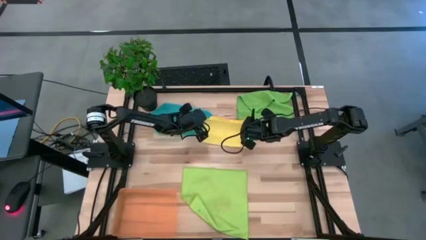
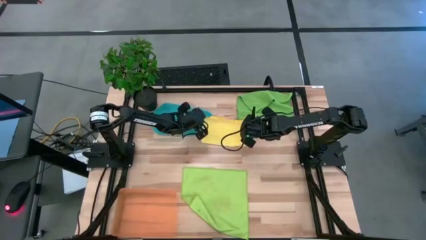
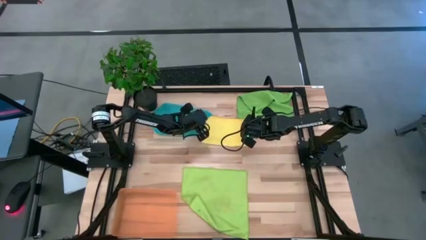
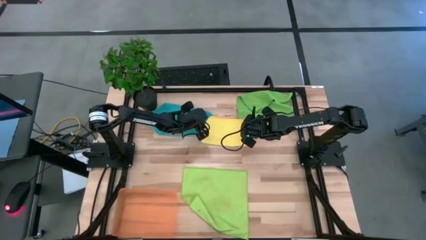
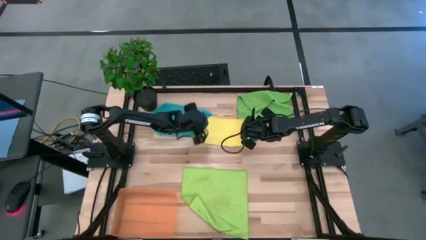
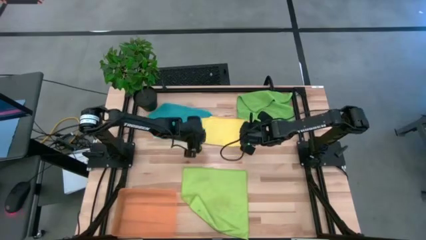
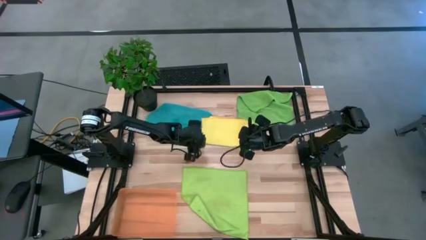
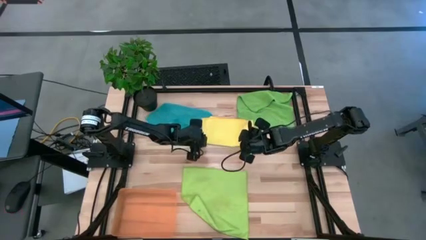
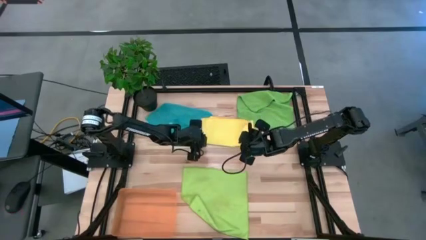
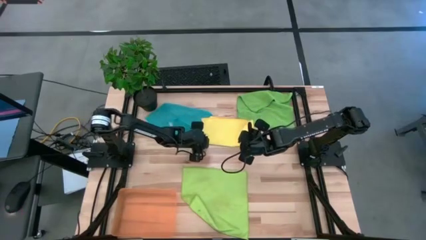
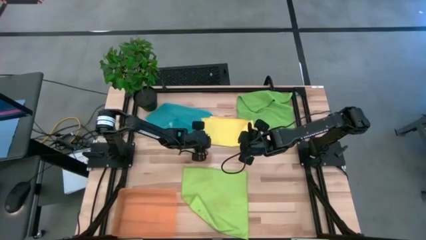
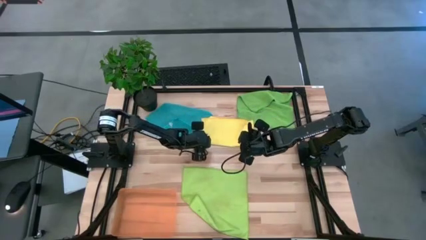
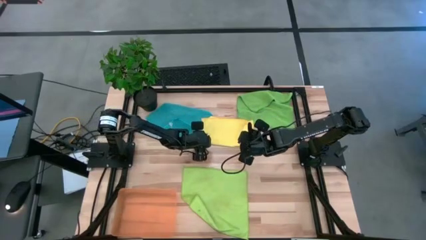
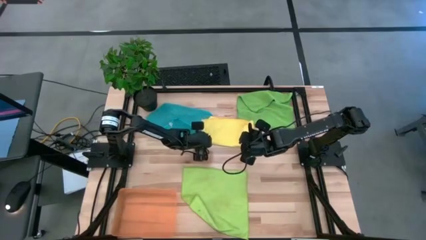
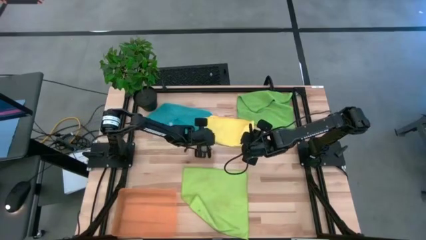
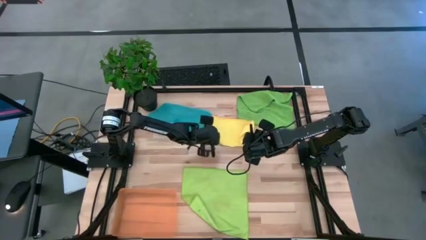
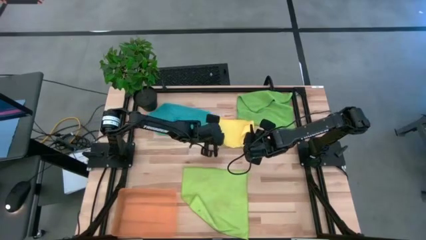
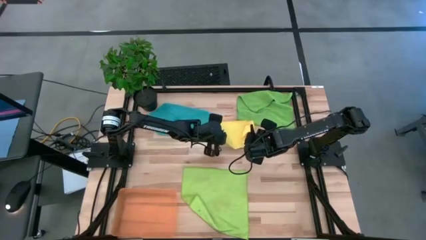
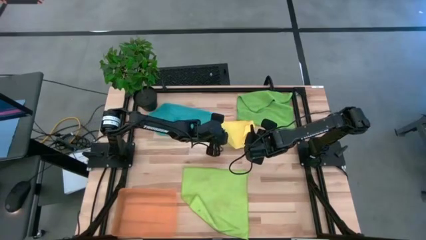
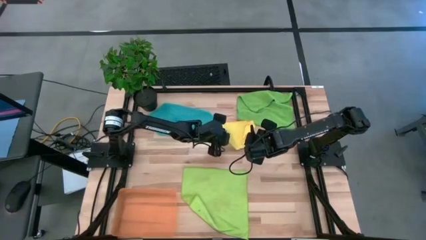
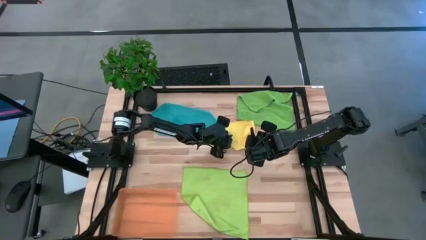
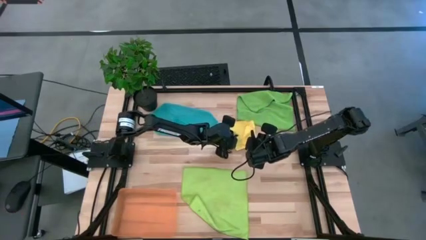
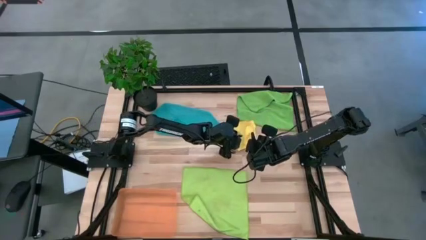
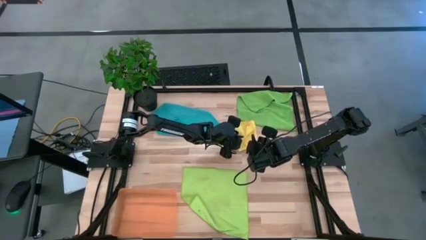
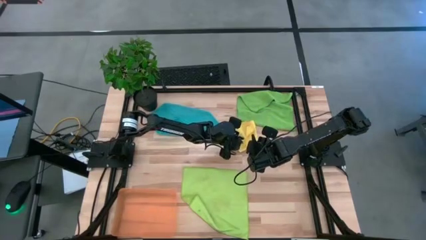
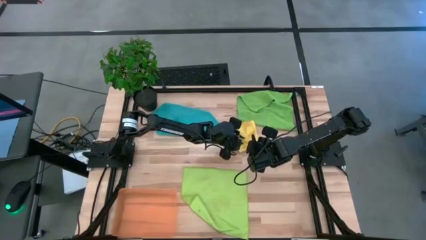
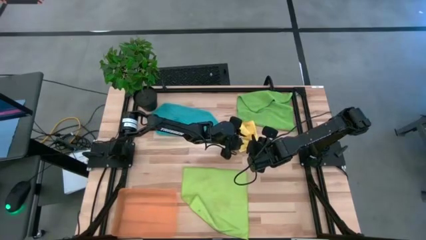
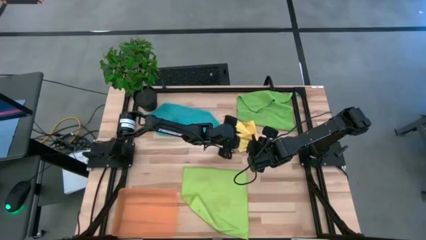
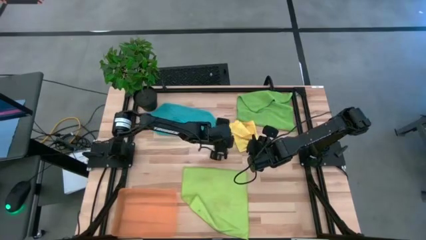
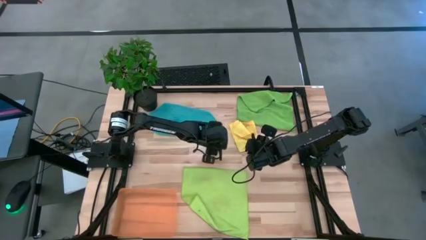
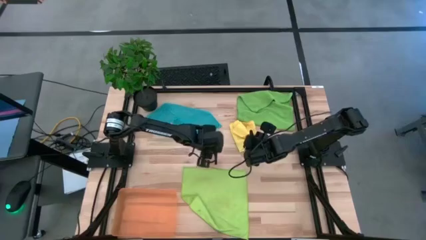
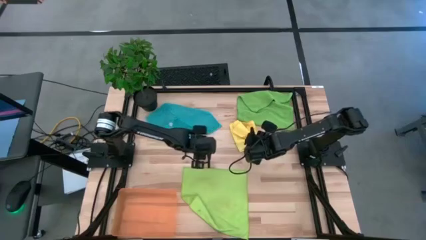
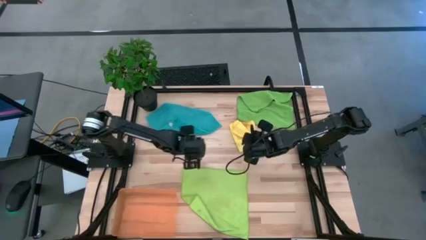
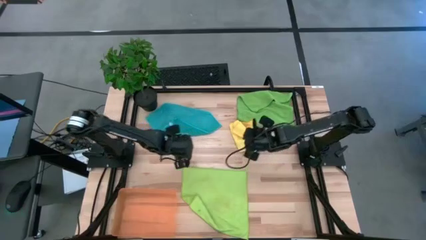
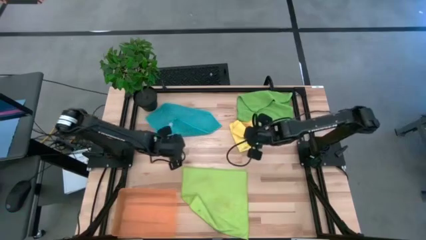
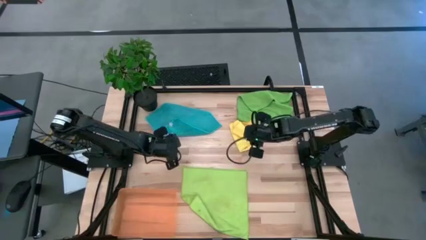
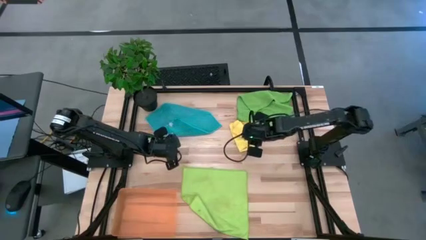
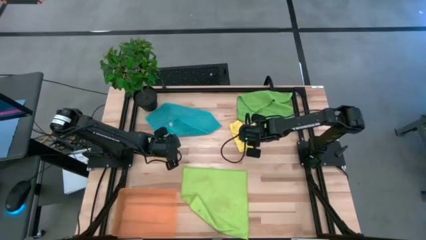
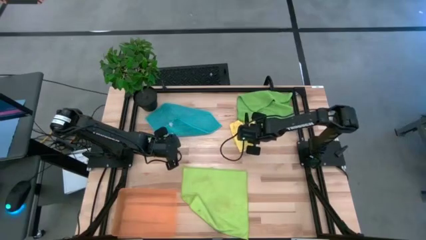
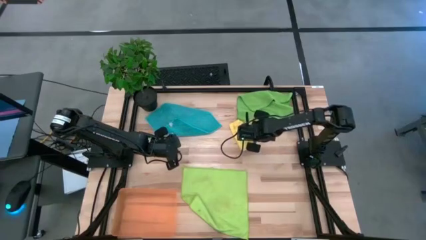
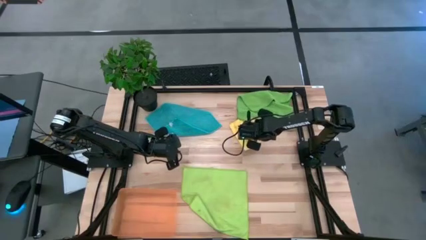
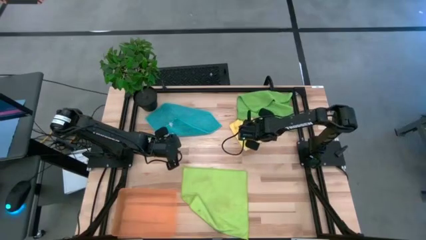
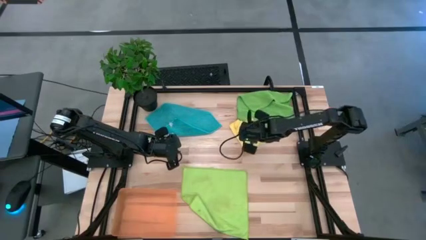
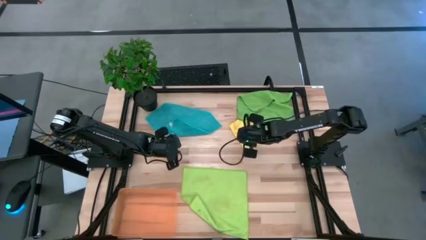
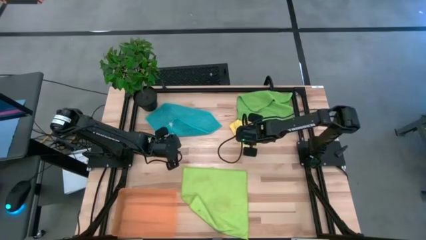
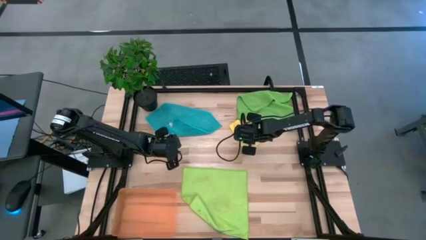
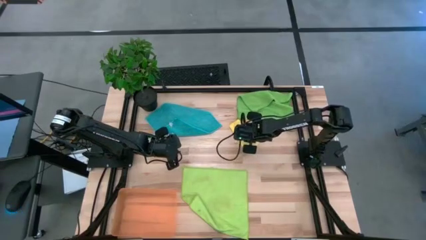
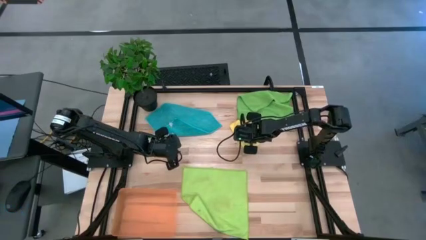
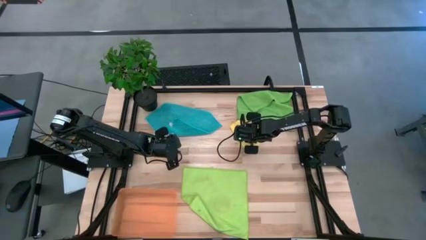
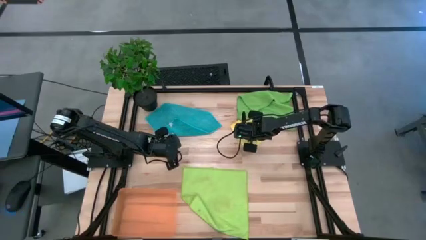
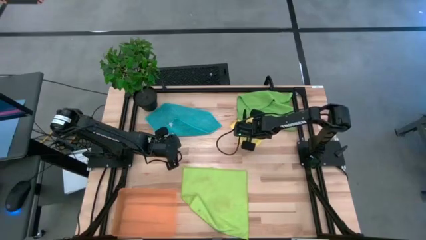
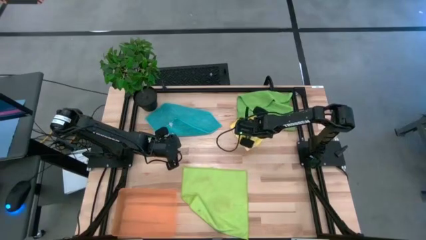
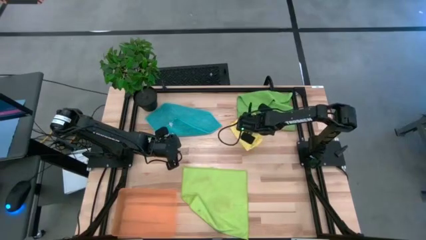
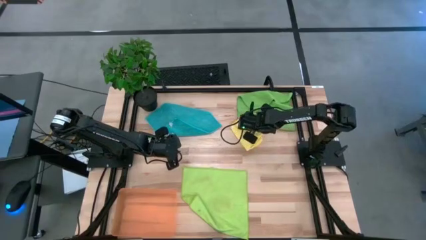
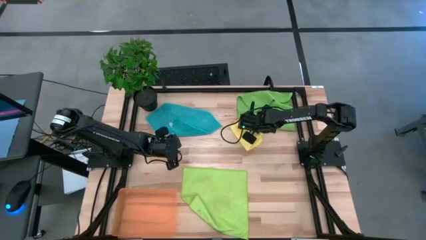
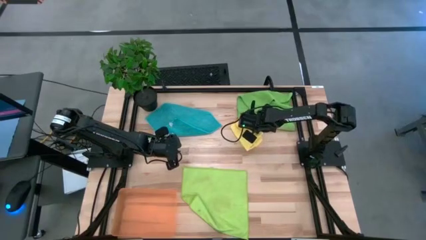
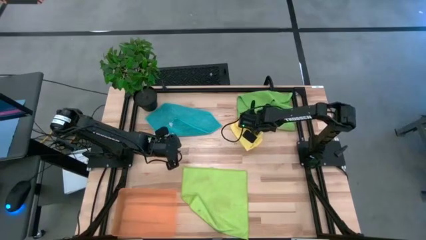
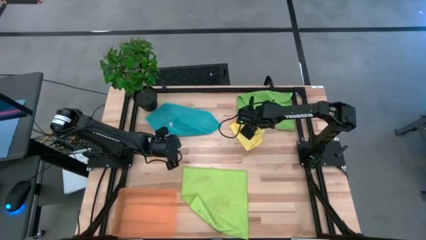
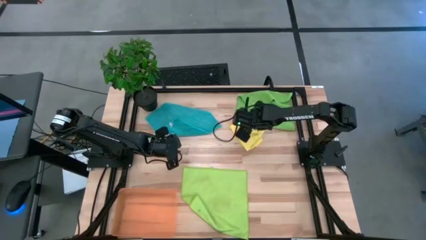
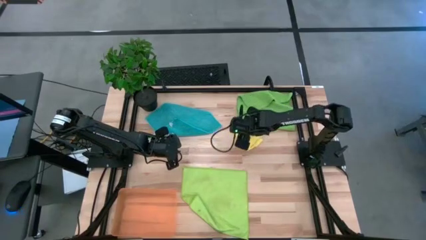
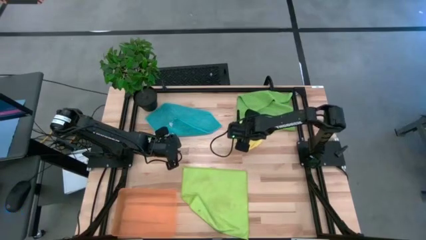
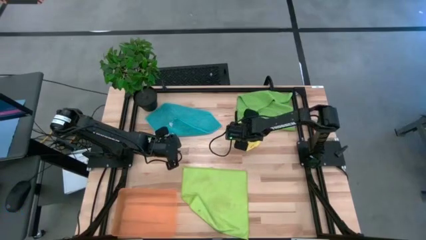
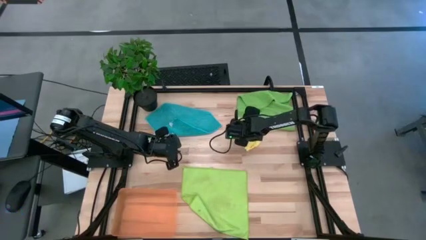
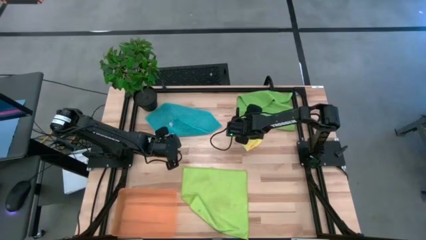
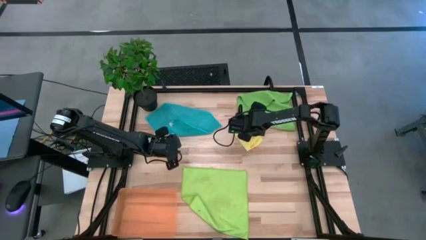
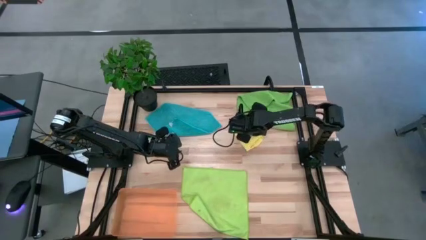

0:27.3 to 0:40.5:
Task: Fold microfiber towels
Fold the yellow towel
